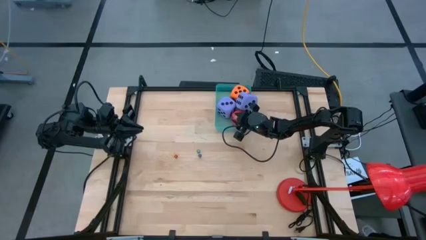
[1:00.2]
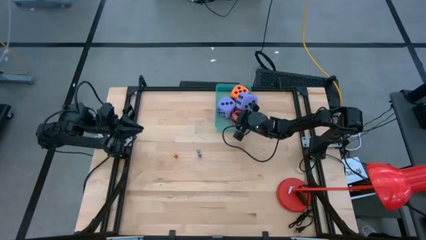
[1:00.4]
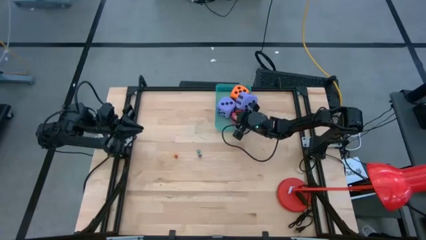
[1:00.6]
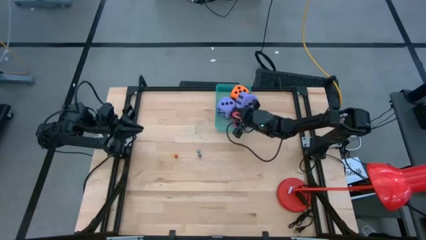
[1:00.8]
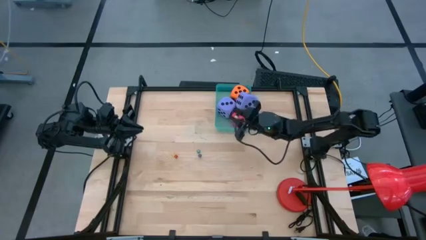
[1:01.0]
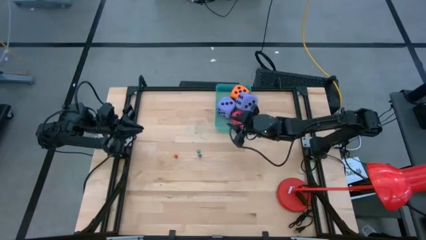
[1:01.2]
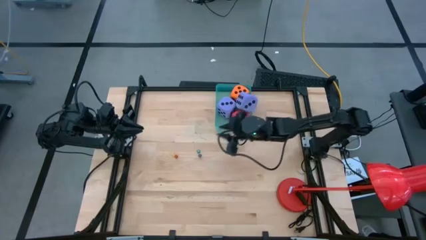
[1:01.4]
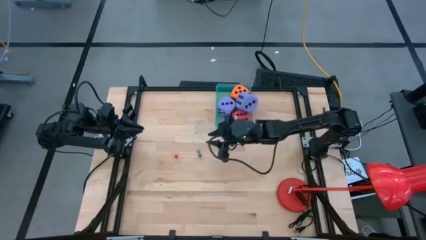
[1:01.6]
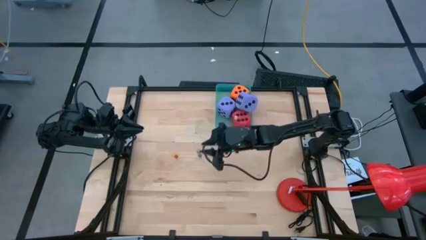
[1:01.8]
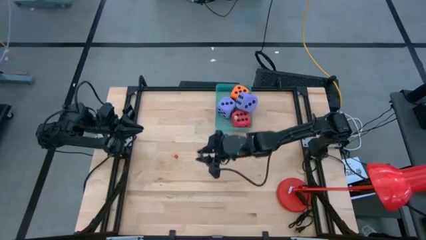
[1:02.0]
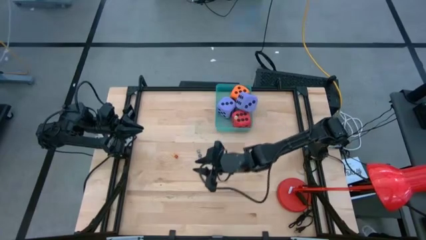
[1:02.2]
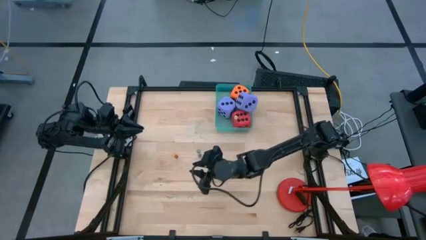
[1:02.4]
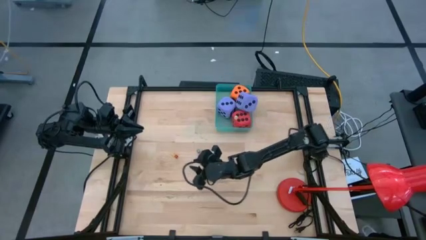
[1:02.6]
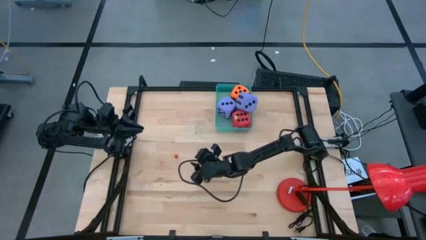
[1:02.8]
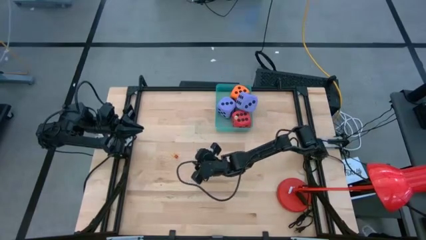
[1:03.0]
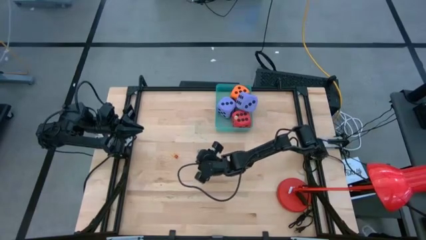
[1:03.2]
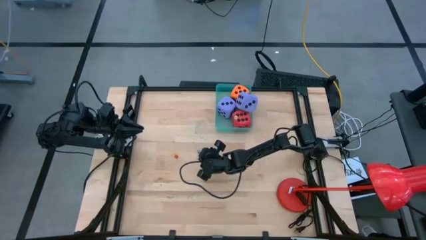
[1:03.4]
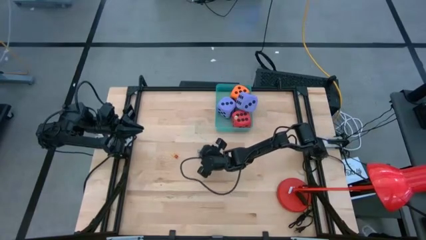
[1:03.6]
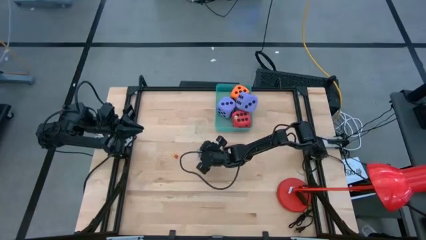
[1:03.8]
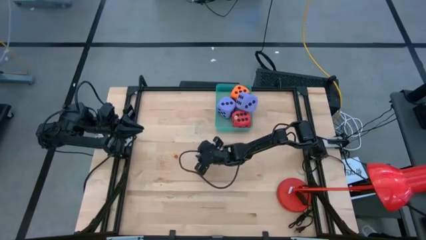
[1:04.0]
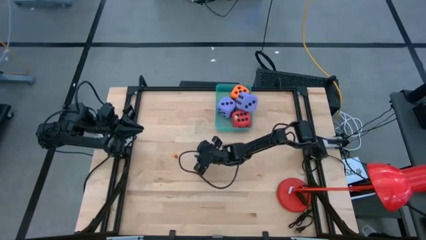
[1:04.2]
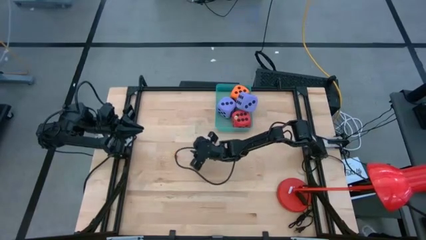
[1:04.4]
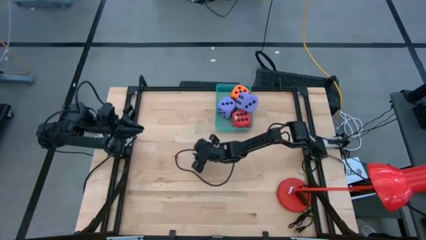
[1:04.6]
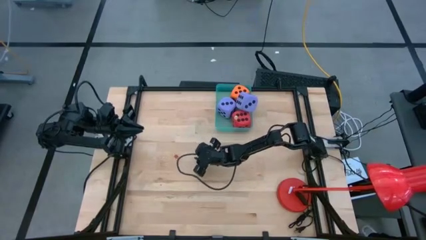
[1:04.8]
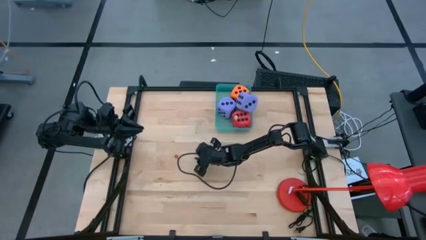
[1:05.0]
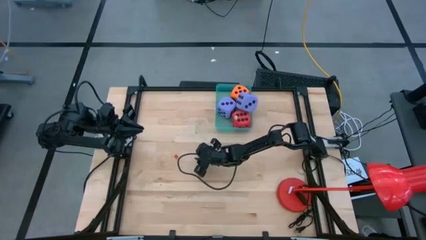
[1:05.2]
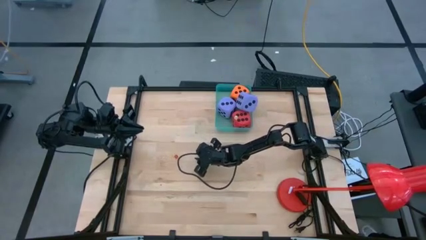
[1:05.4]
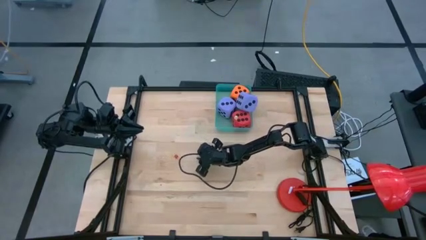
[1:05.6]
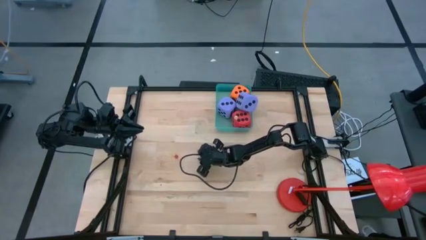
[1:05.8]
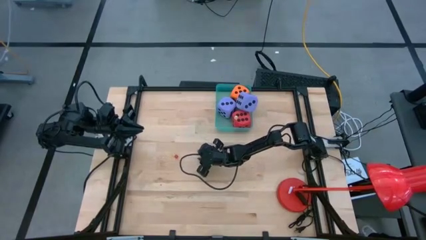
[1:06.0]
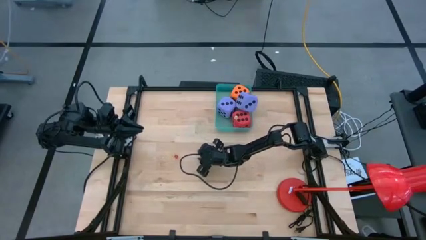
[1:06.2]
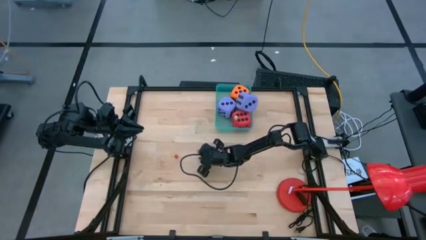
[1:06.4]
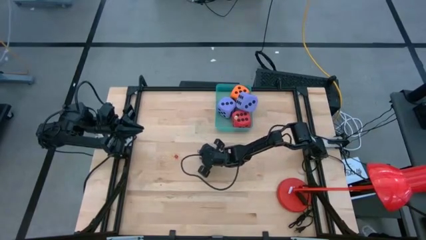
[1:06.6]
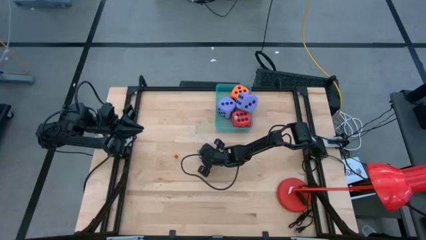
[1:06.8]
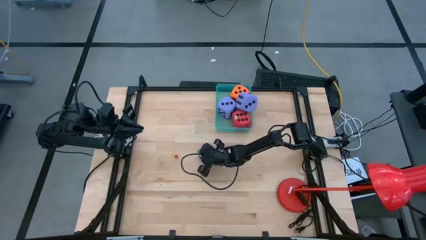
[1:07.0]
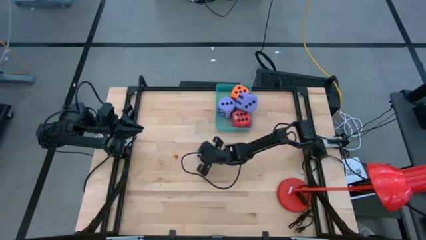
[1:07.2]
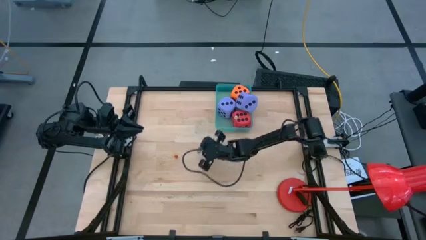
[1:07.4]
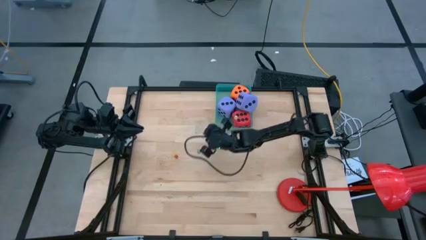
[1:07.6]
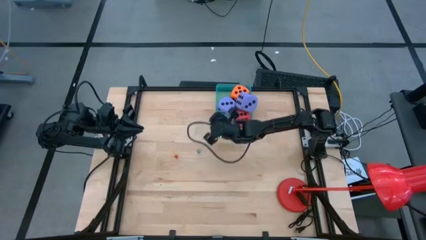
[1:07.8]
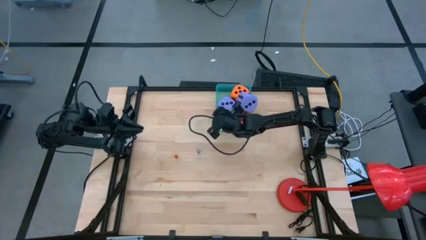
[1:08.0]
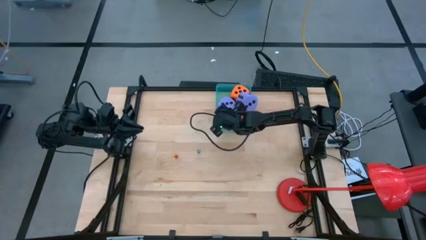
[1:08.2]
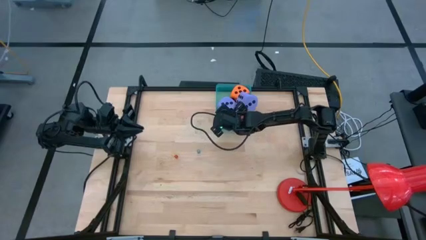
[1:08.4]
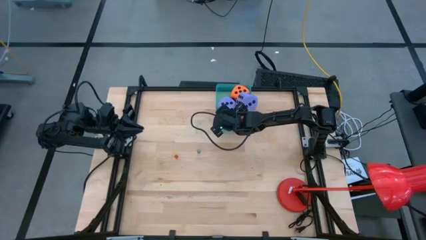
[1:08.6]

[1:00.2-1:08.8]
Task: Pick & Place Dice
Put the small purple die into the green bin

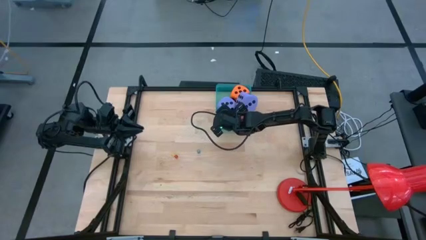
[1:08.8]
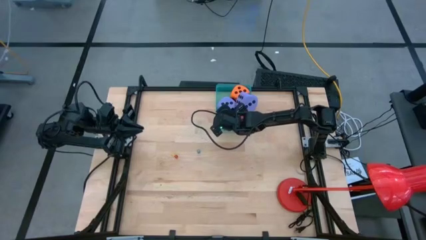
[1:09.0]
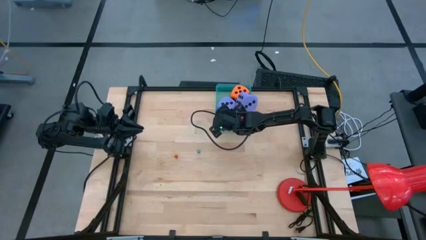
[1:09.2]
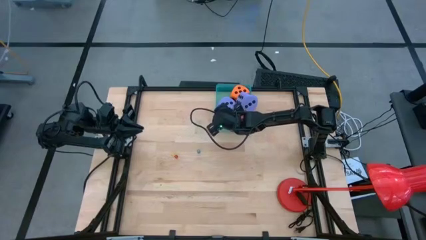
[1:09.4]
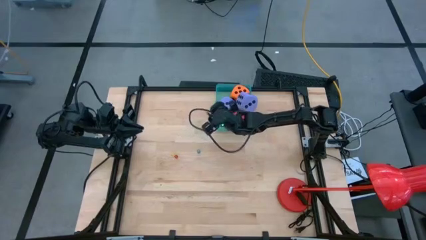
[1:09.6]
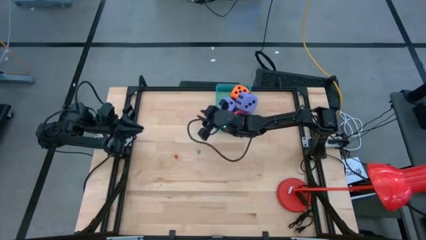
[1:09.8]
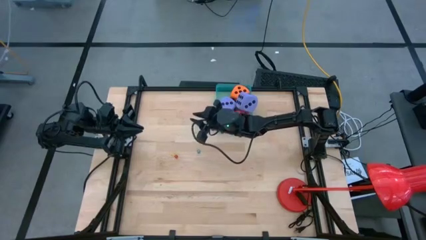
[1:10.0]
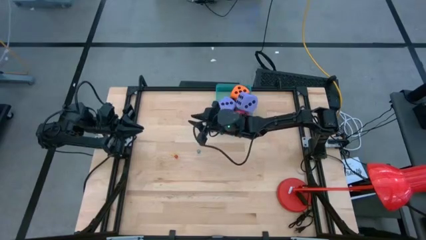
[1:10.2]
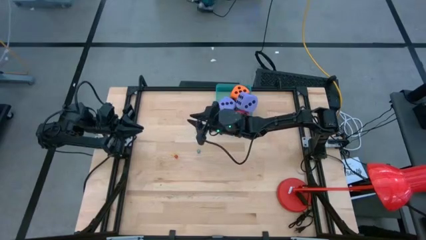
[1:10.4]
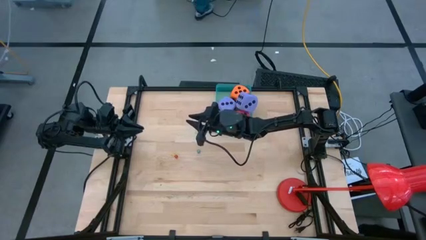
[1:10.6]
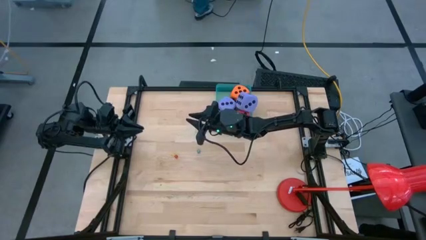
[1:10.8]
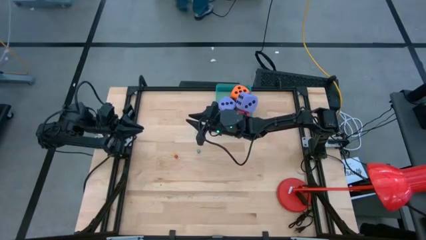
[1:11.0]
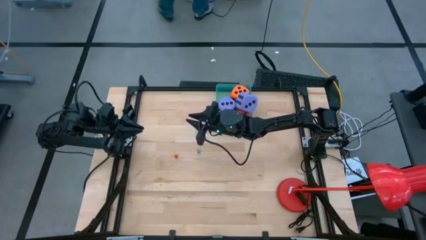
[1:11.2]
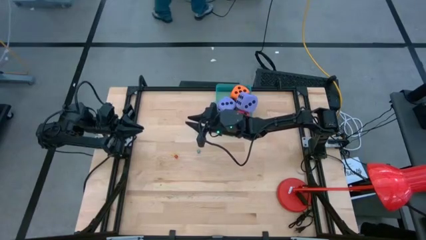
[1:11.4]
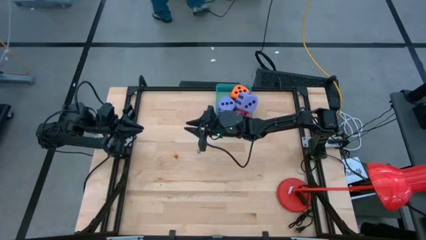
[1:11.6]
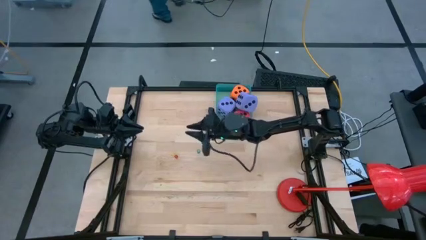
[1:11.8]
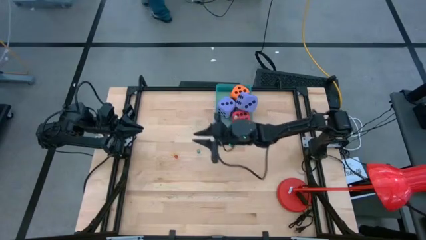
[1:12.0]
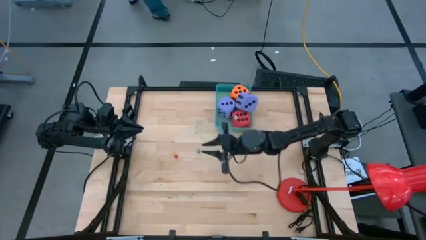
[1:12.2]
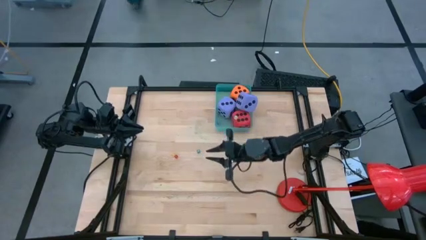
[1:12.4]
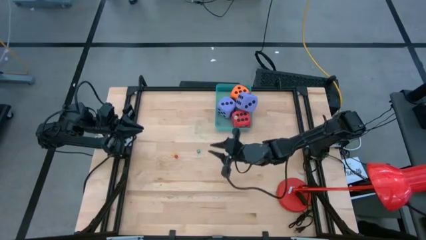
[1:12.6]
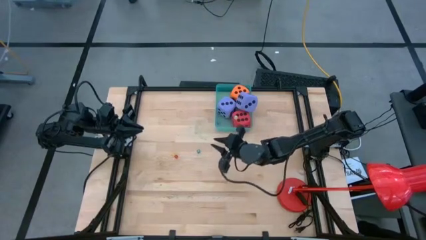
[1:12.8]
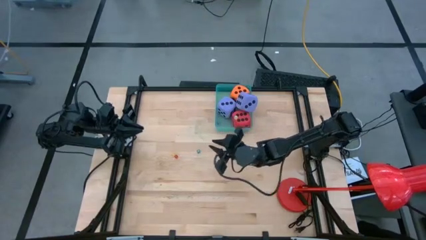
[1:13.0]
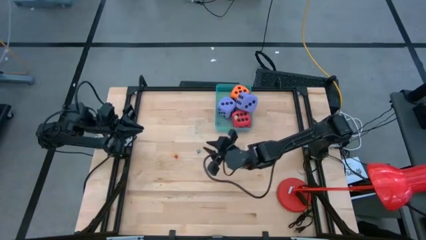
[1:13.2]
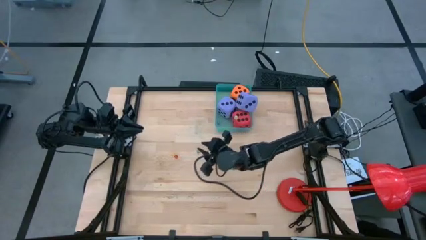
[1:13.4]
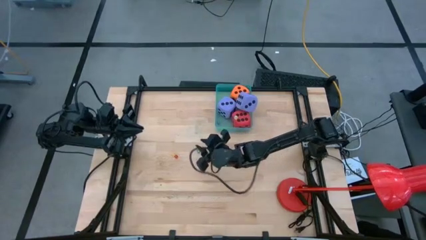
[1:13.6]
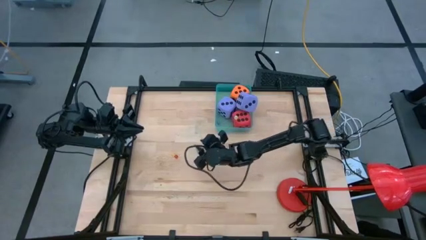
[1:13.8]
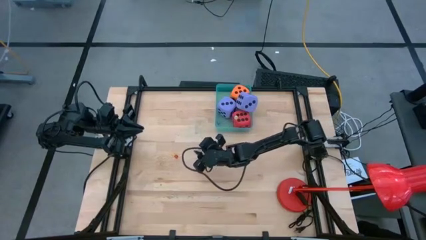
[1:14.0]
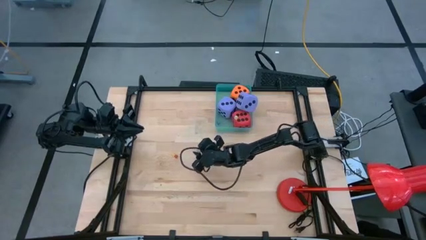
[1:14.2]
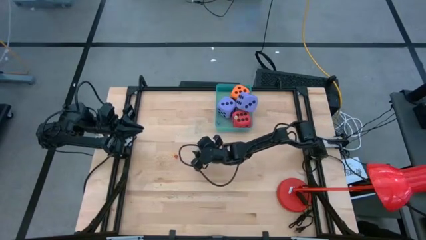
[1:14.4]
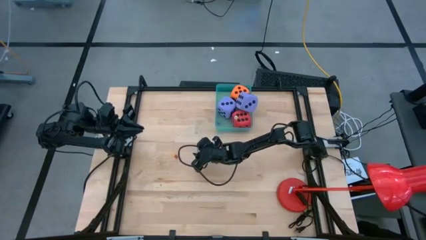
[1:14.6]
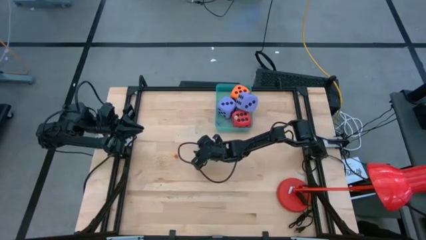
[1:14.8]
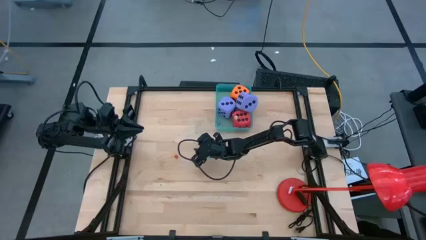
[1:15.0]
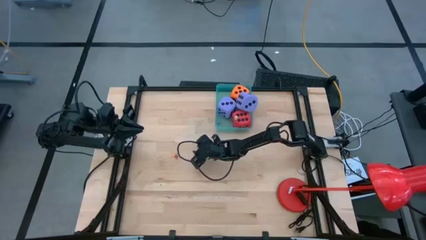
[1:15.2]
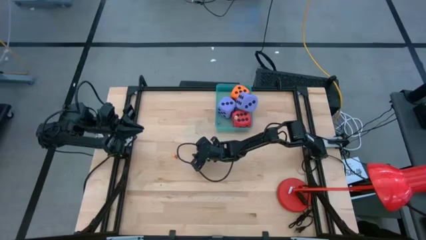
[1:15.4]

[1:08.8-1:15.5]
Put the green die into the green bin
